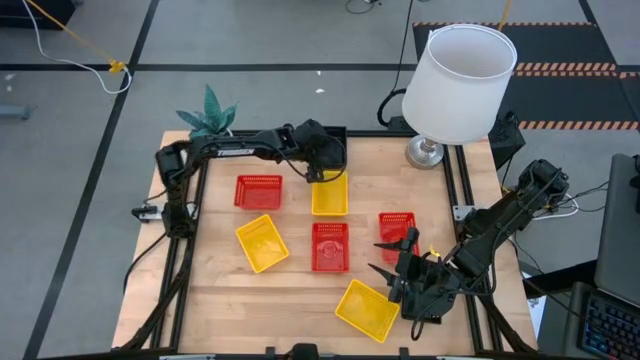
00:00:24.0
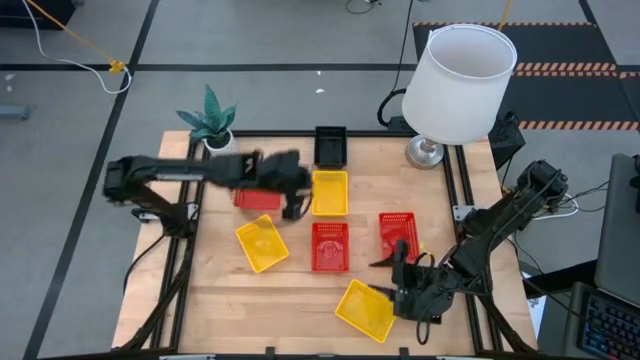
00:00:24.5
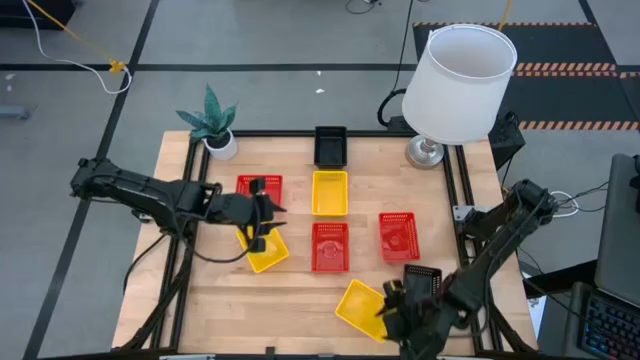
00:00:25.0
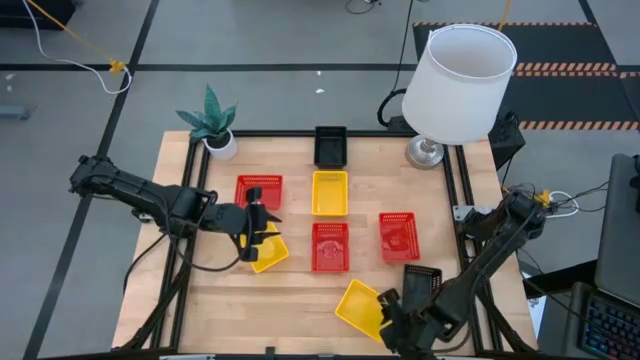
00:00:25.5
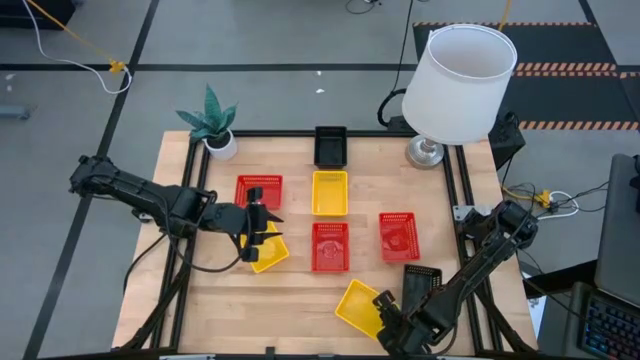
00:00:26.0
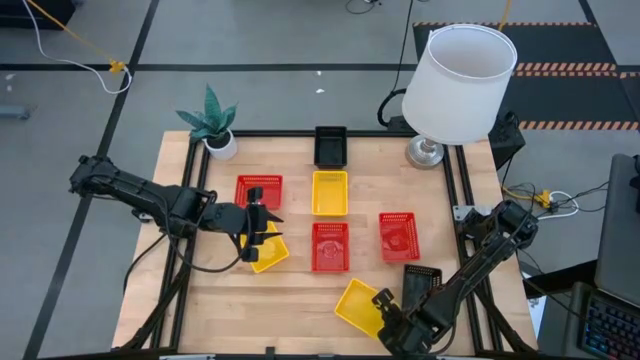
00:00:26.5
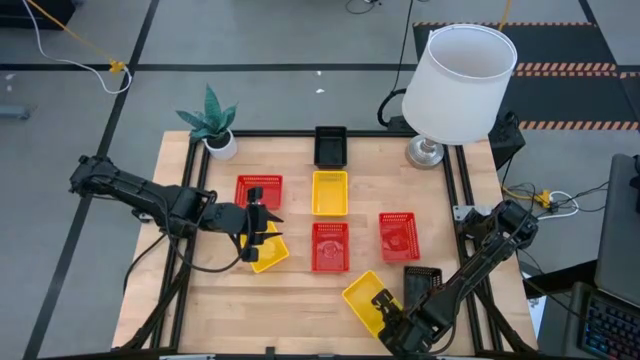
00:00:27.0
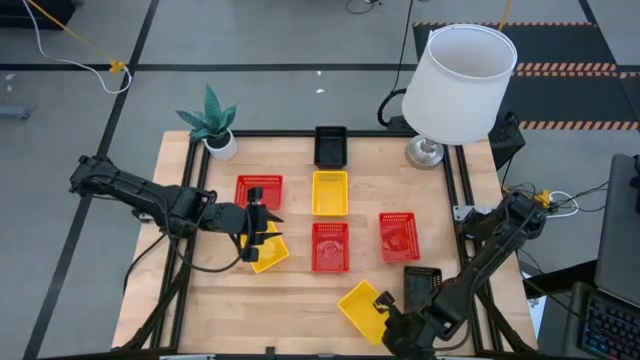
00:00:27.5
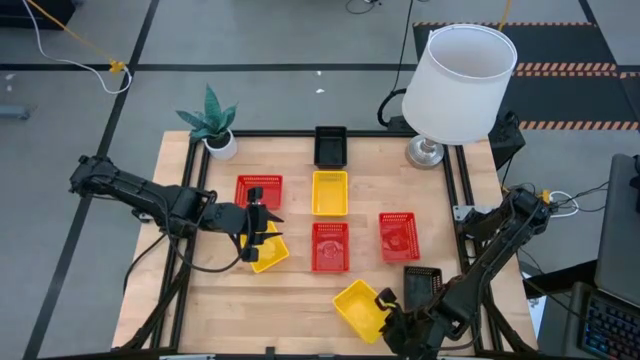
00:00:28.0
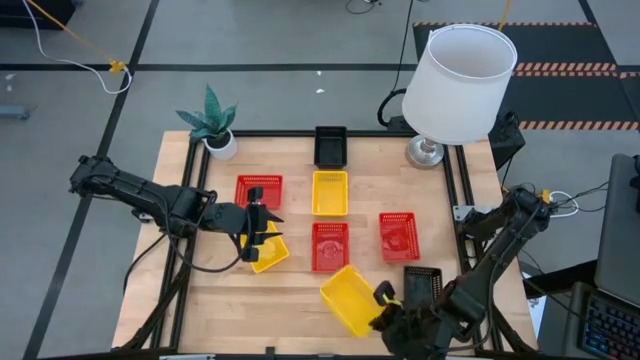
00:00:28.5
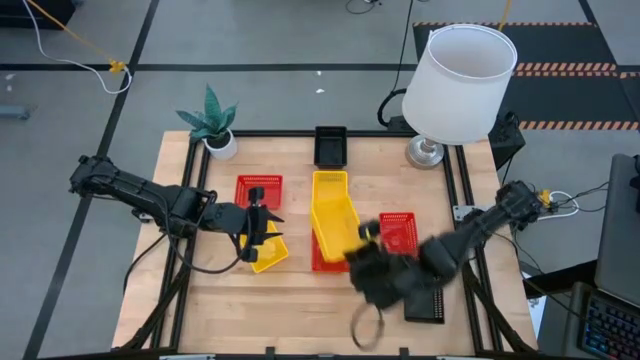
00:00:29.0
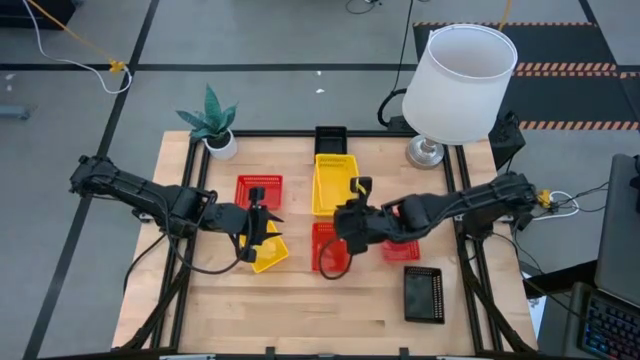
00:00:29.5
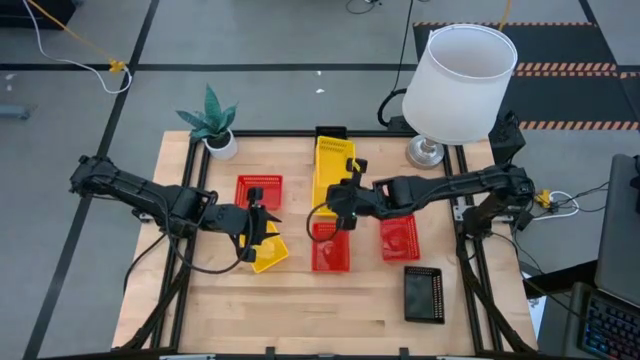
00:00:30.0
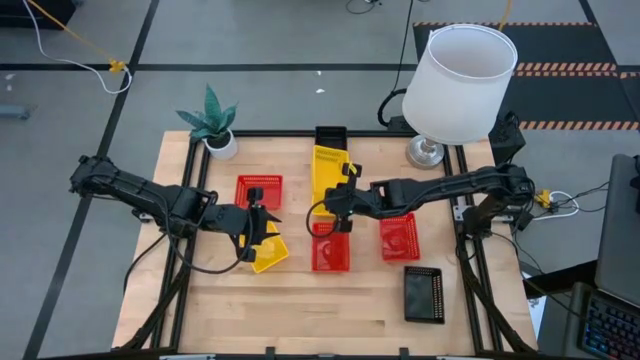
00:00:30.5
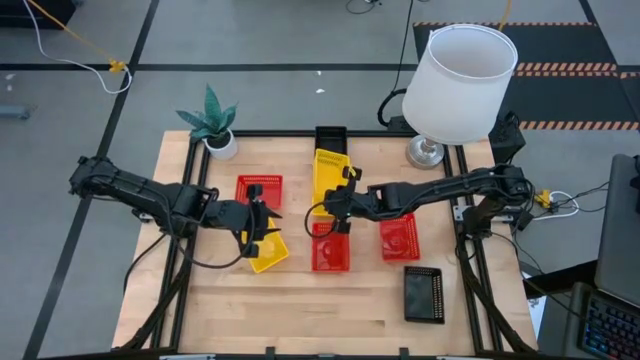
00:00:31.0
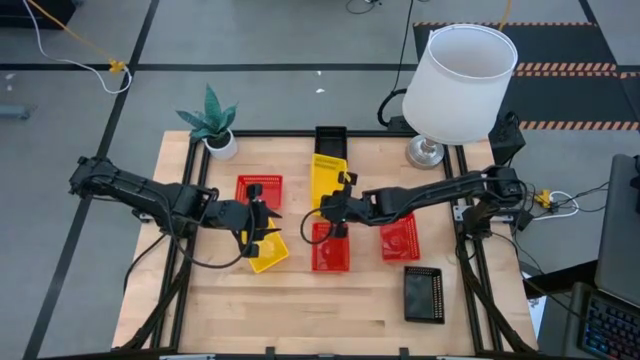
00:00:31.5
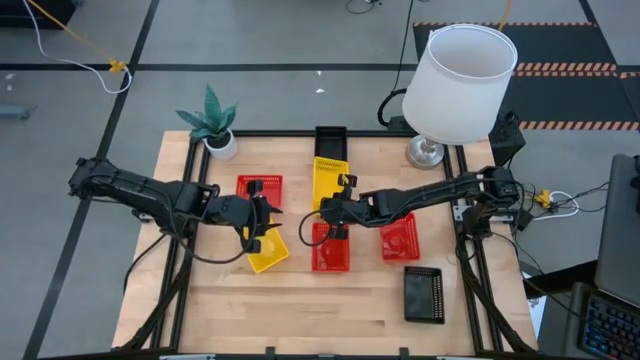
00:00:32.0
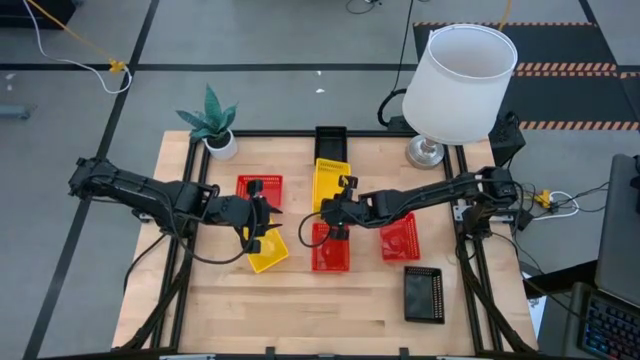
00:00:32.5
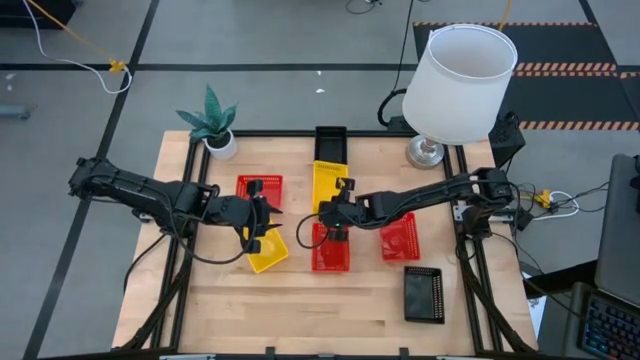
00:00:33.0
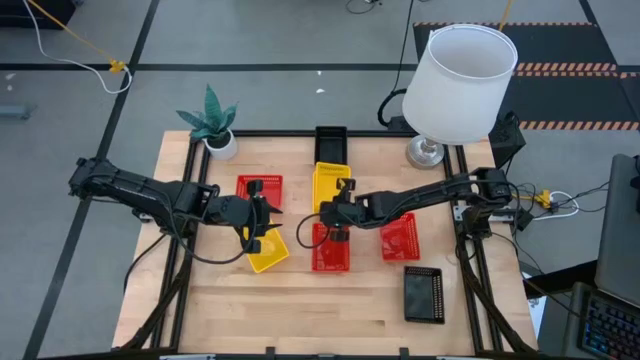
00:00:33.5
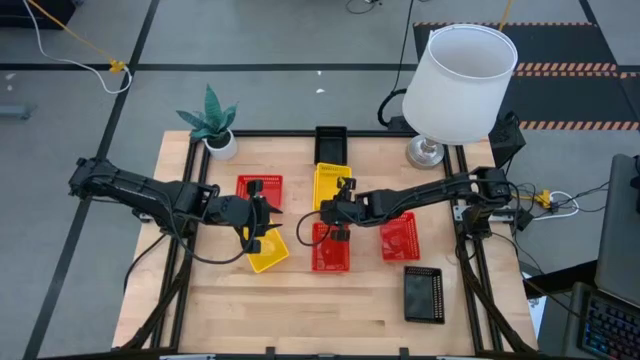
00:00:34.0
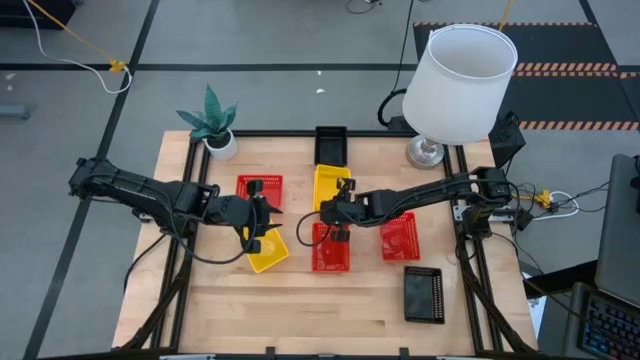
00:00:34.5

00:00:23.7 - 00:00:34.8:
Stack the bottom right yellow bin on top of the top yellow bin

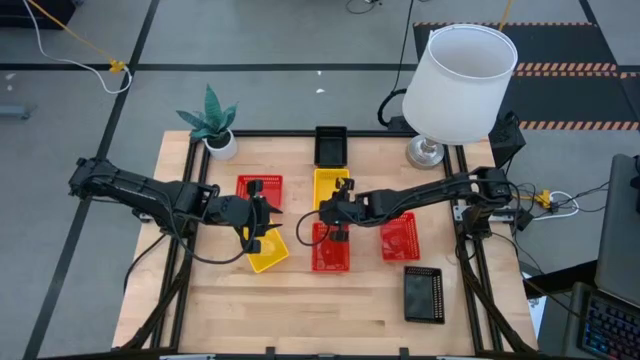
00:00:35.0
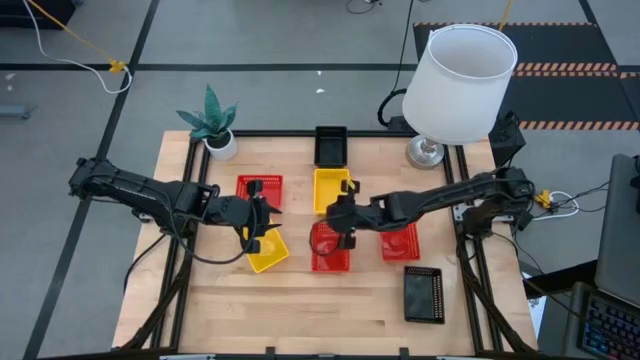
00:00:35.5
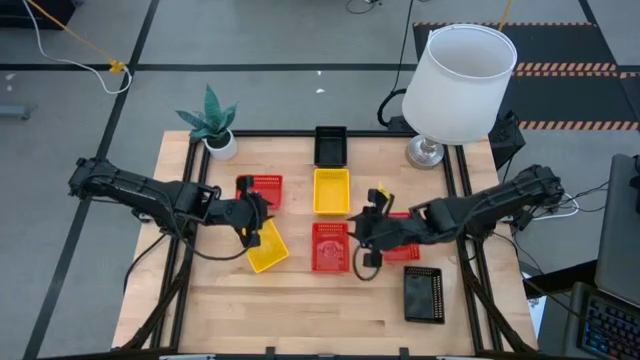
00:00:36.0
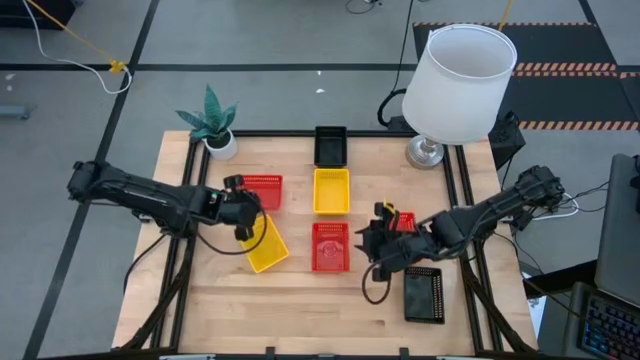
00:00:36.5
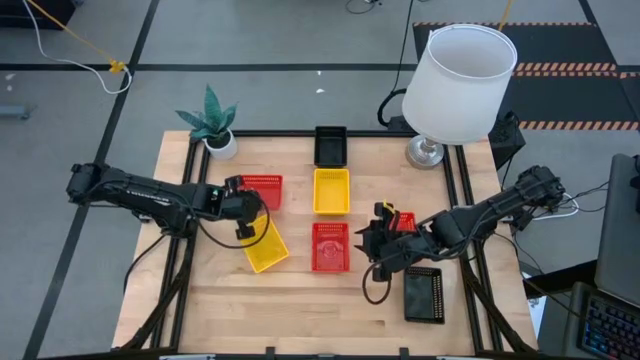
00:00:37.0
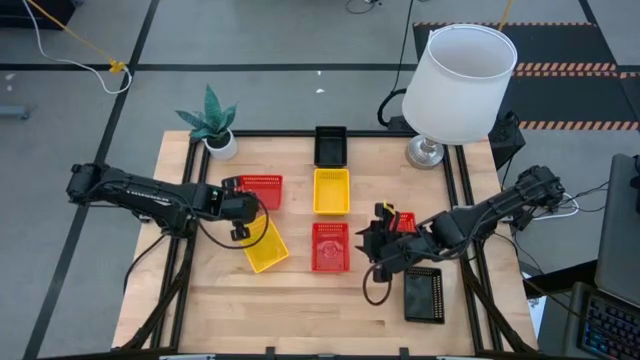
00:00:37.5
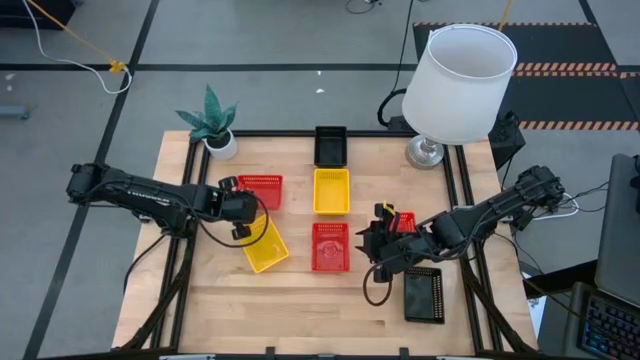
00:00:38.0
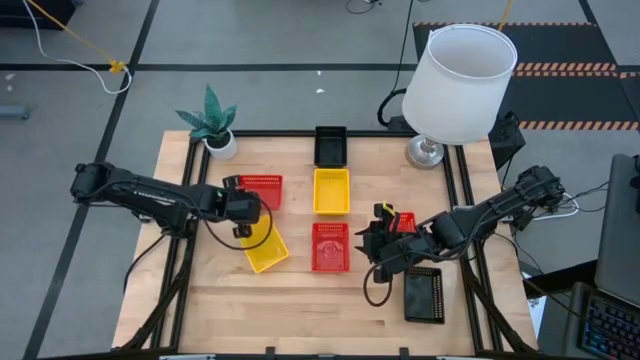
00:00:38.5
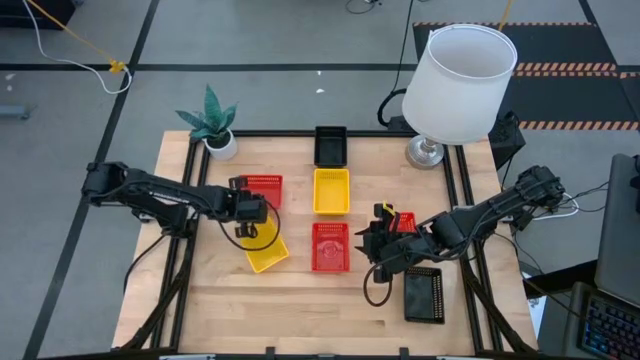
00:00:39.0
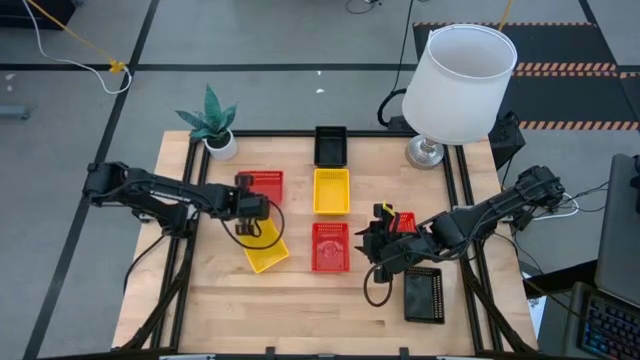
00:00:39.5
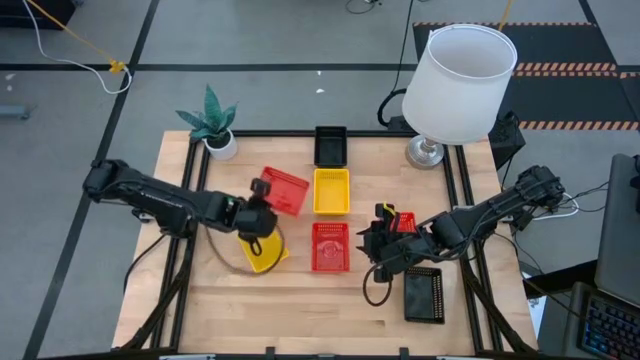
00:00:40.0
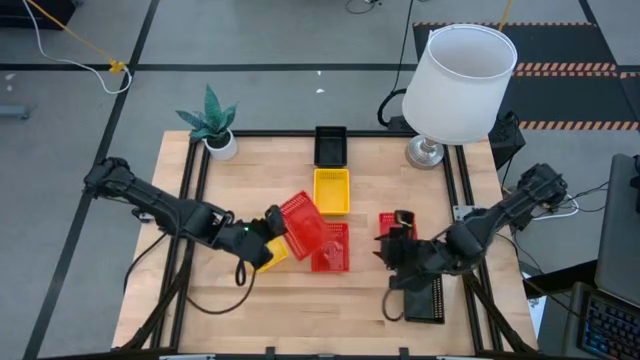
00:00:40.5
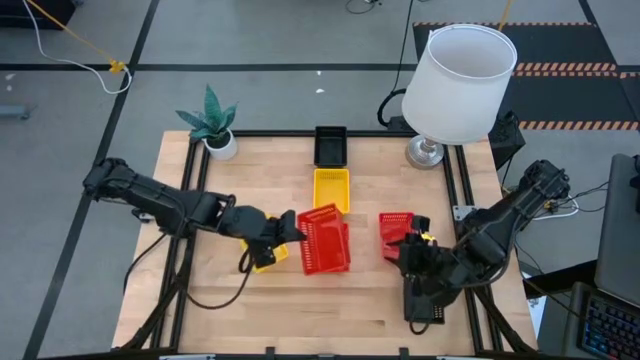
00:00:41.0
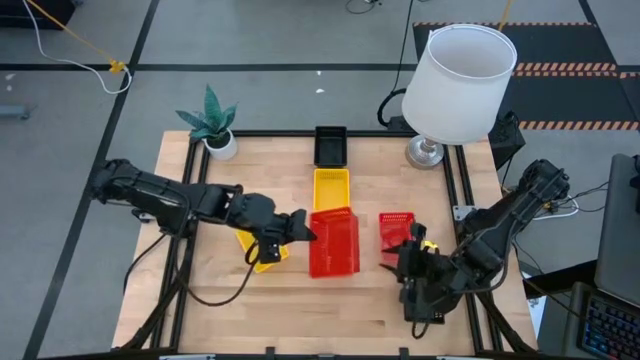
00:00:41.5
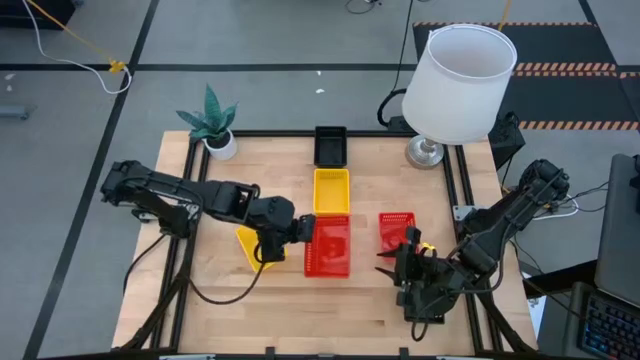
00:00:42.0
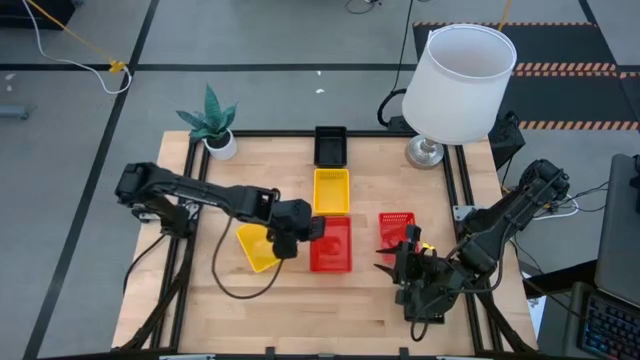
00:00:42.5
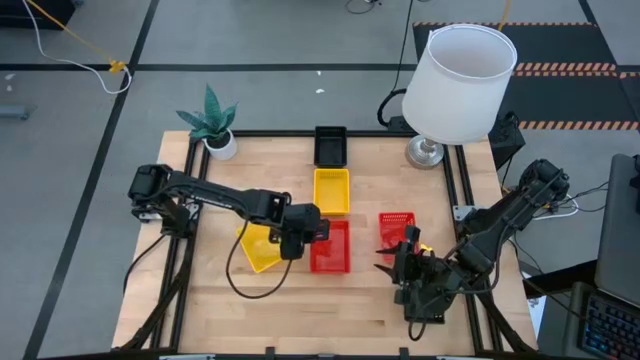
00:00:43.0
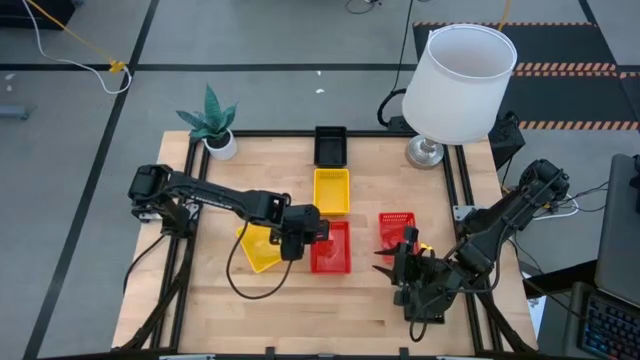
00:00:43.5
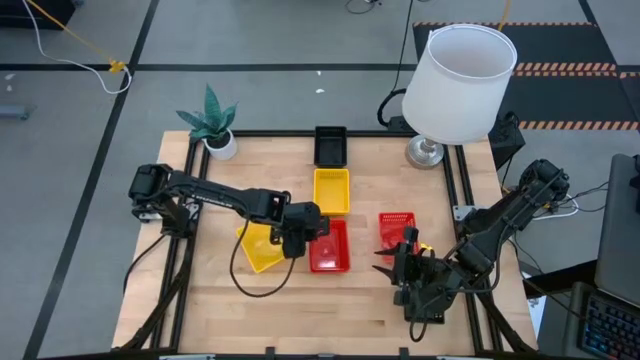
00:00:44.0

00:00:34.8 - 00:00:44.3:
Stack the top red bin on top of the bottom left red bin
